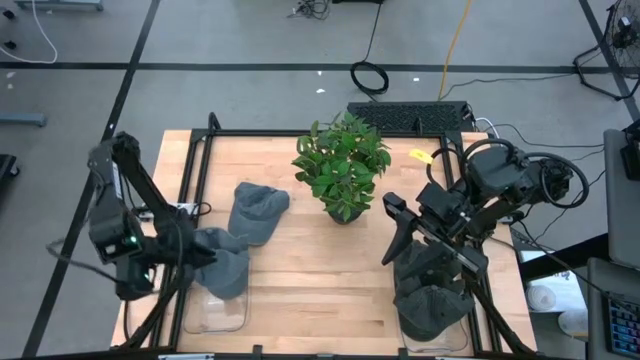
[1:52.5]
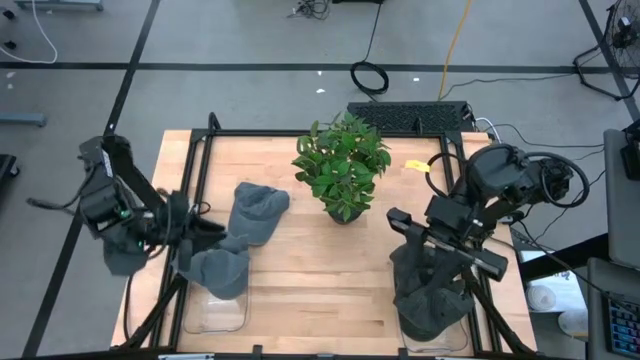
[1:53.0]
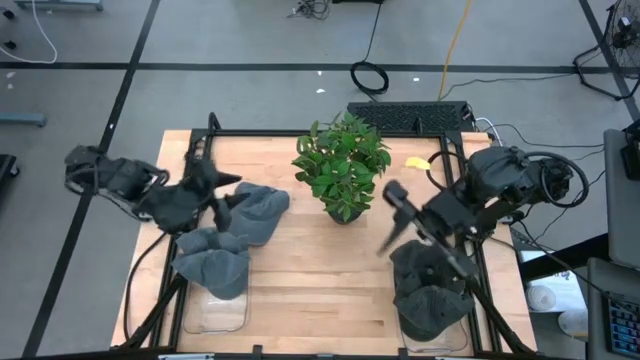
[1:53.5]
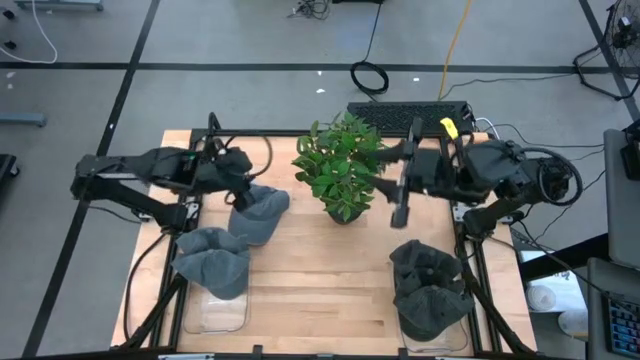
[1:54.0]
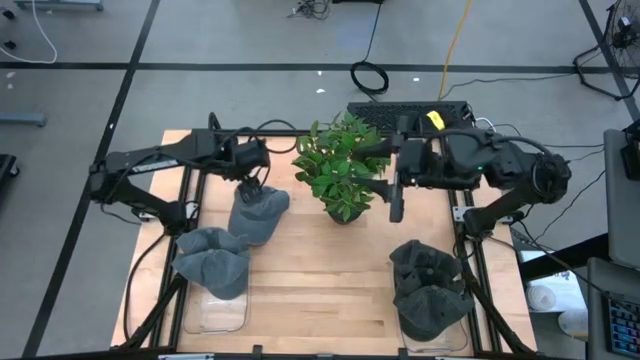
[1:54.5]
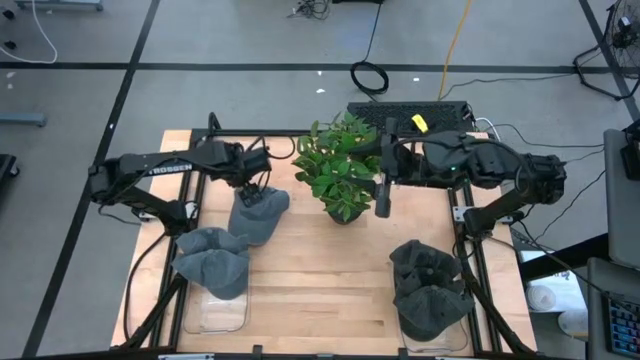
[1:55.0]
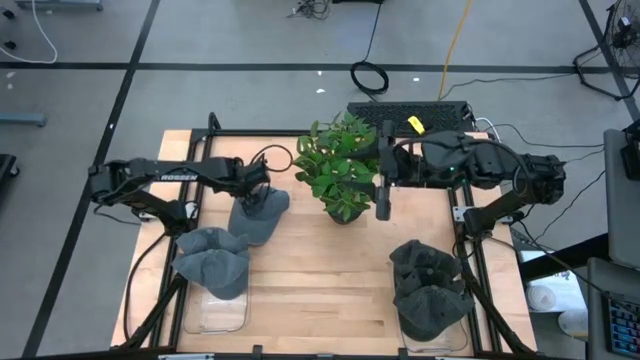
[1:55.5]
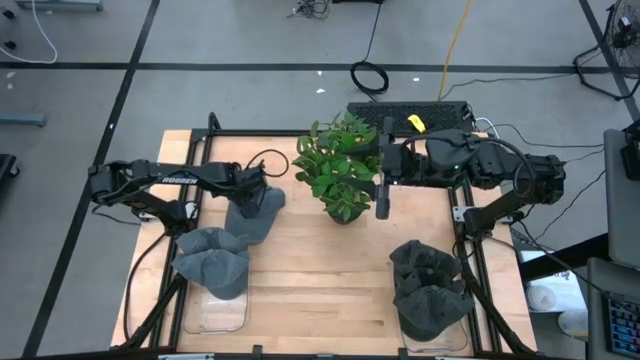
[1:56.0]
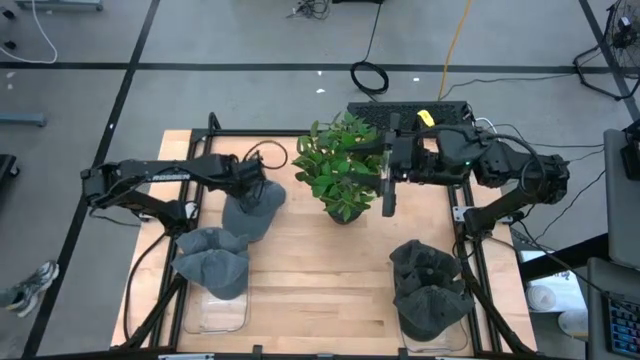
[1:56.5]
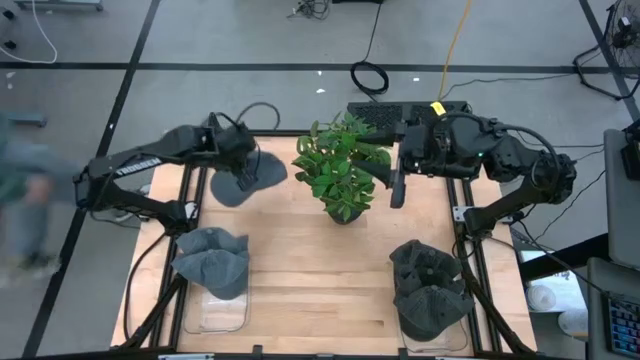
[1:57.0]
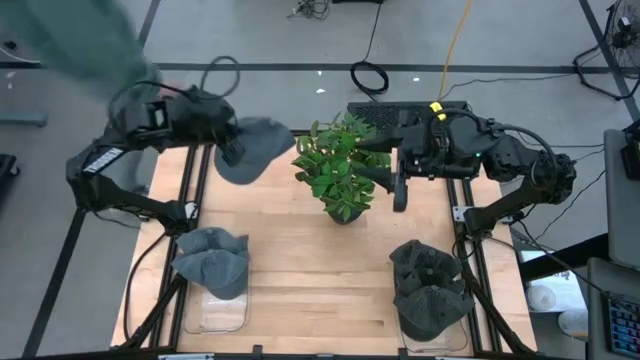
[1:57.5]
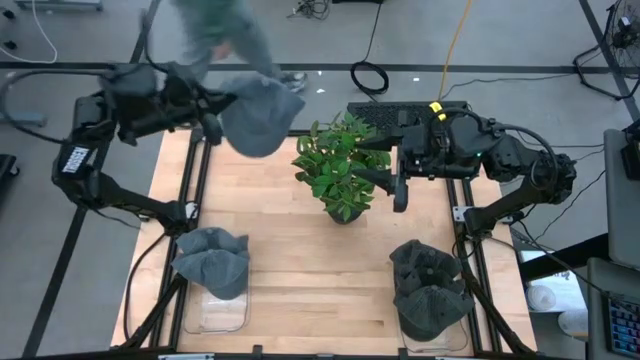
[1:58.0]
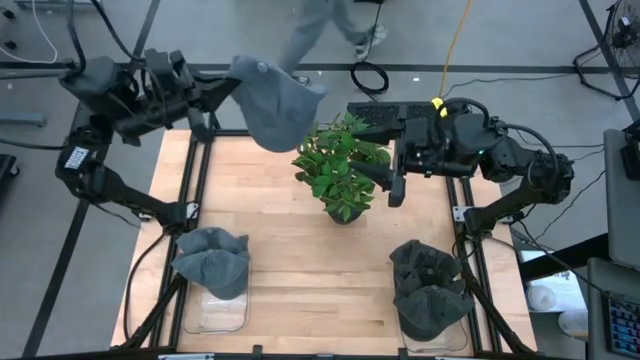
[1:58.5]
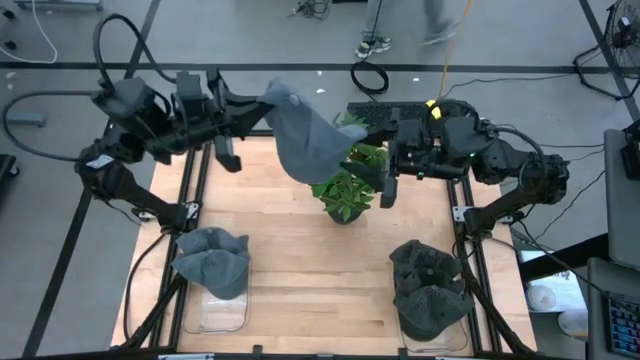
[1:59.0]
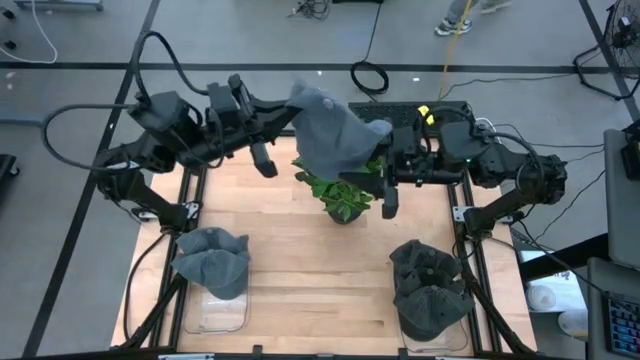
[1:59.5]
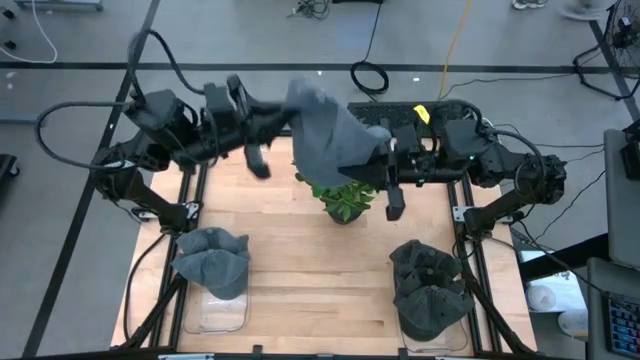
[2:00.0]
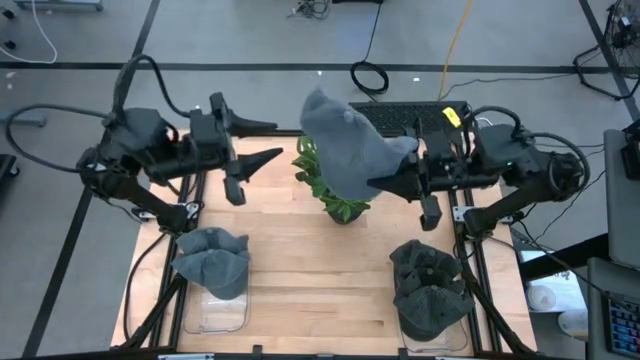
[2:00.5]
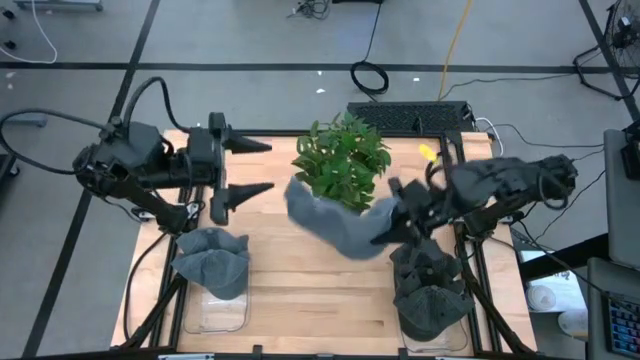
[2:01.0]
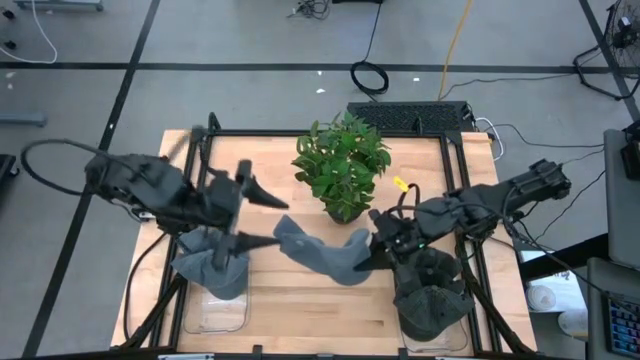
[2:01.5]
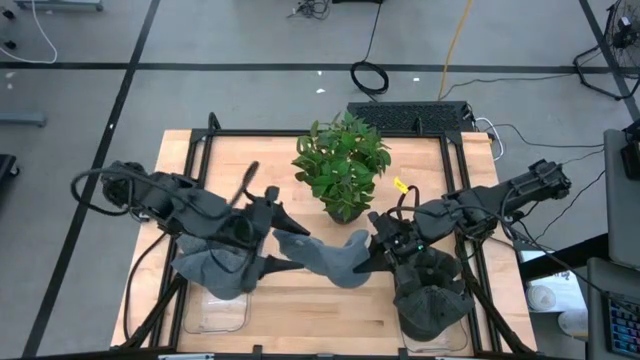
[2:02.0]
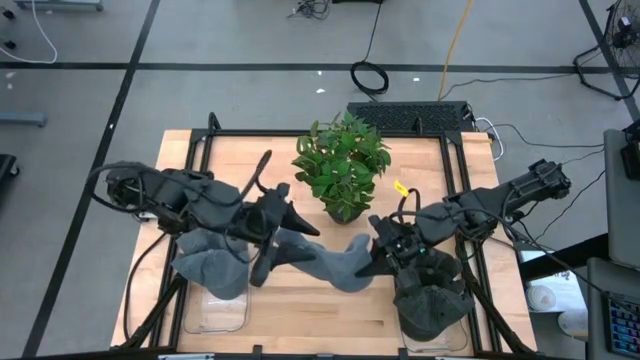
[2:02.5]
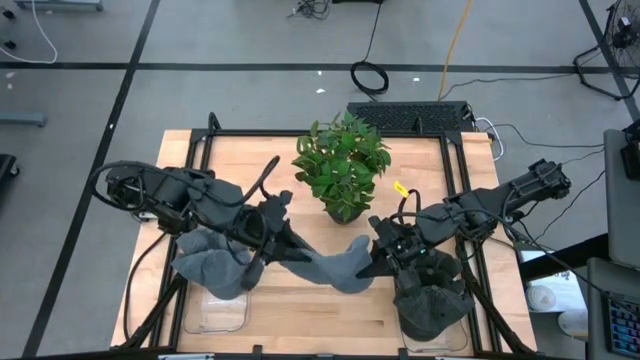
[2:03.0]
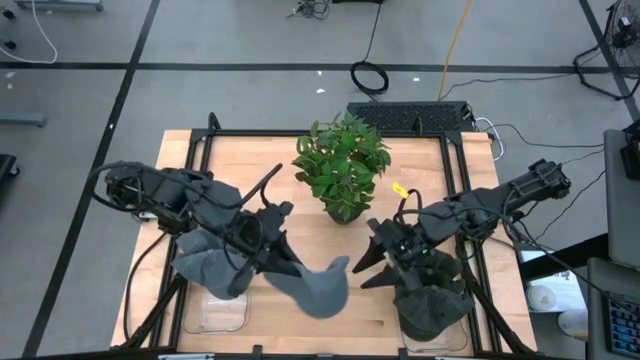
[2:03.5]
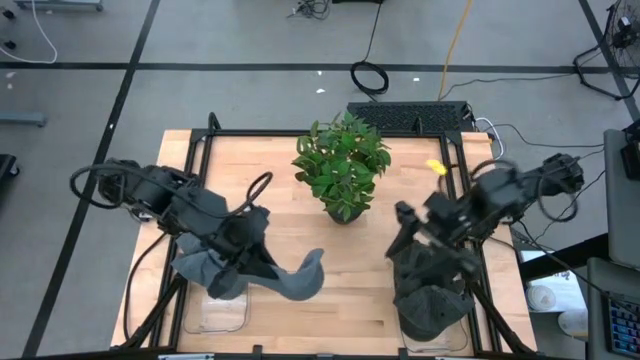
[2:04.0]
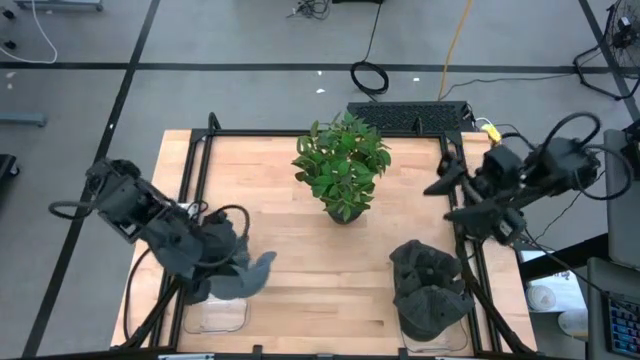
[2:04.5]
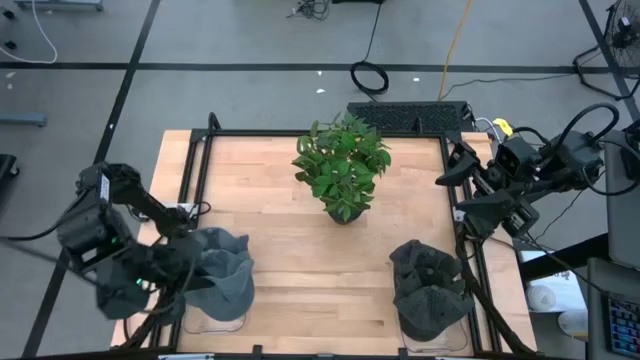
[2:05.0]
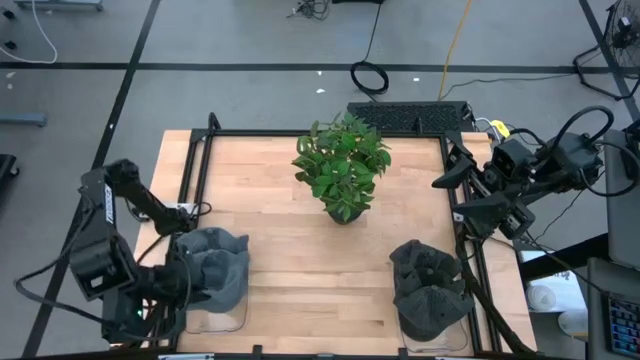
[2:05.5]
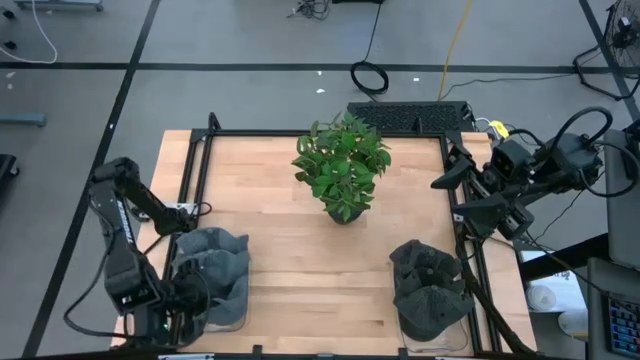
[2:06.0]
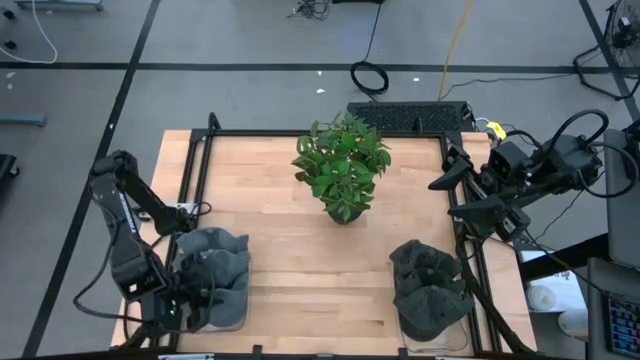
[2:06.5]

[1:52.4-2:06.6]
Task: Pick & Place hat
Put the blue cap into the left transparent bin

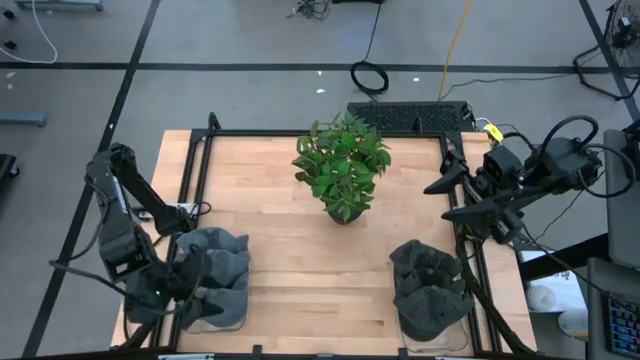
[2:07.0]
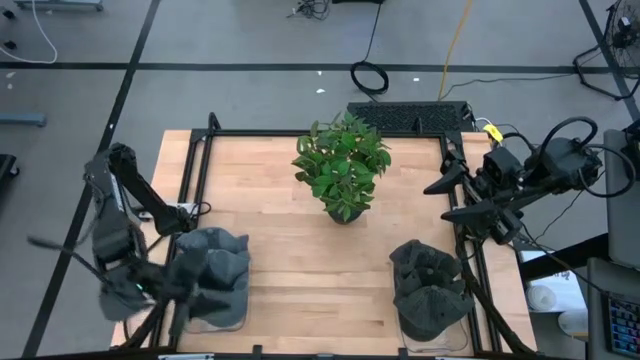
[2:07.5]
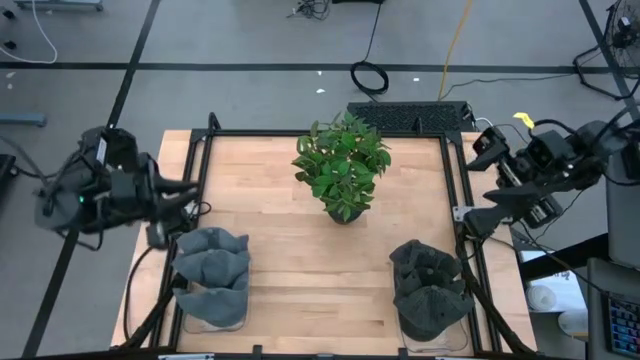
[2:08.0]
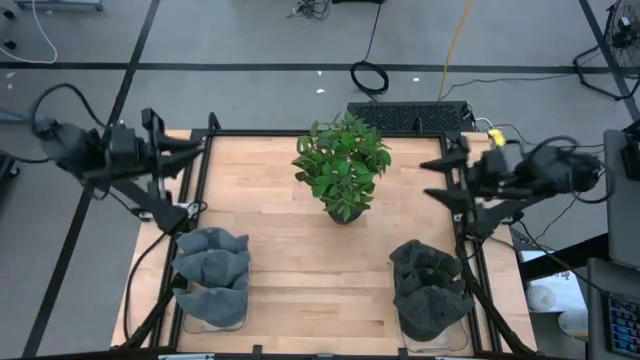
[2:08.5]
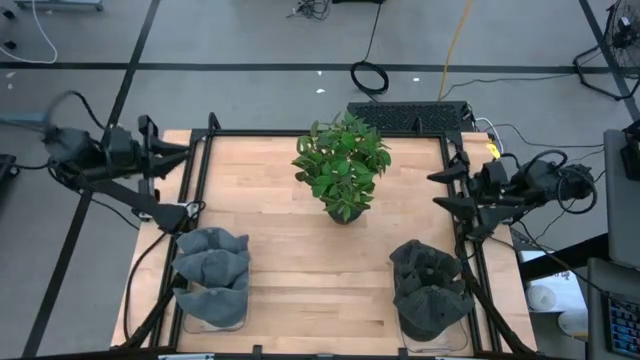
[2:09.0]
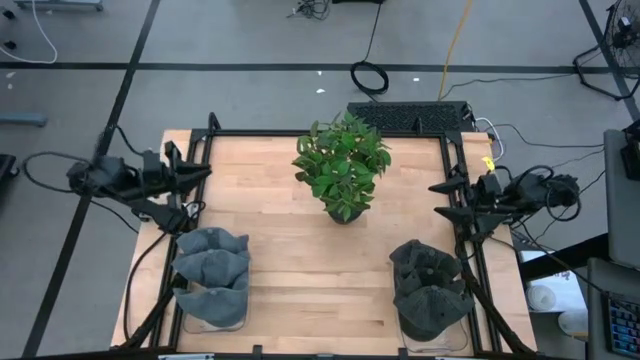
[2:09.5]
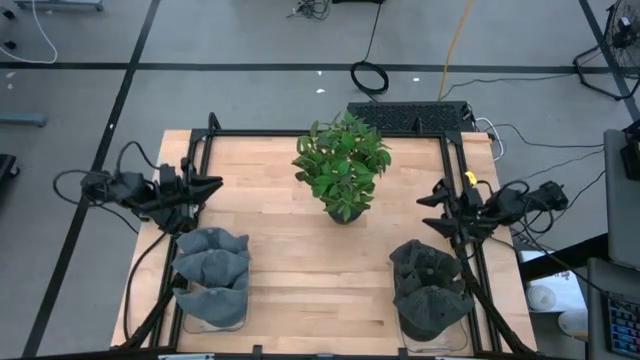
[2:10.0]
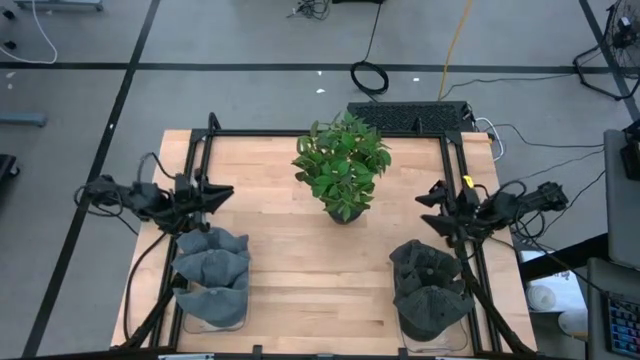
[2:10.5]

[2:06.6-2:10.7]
Return to Home Position

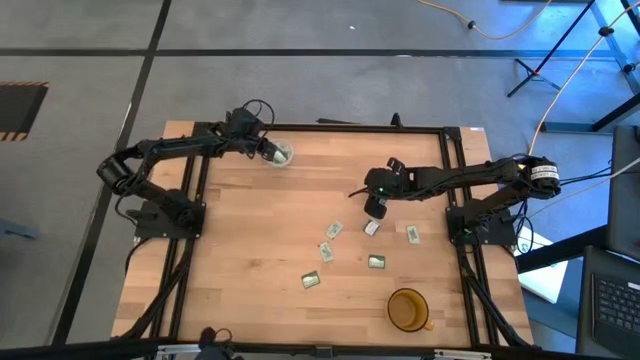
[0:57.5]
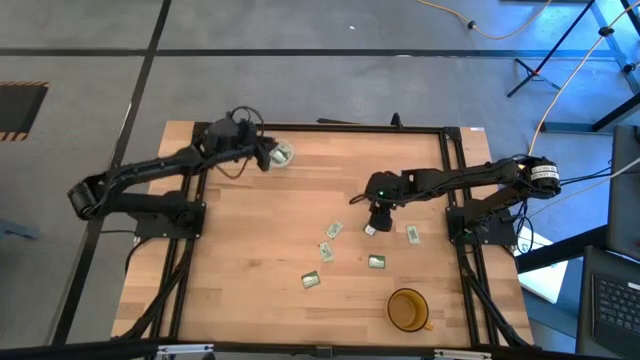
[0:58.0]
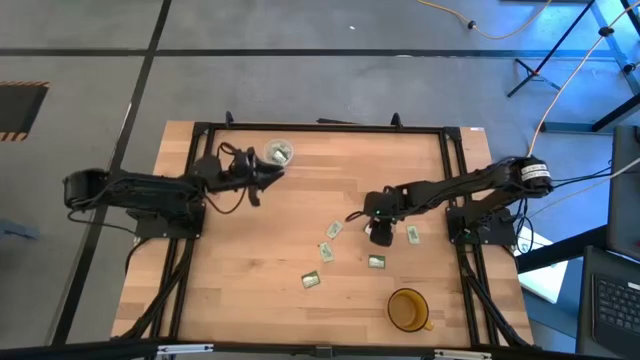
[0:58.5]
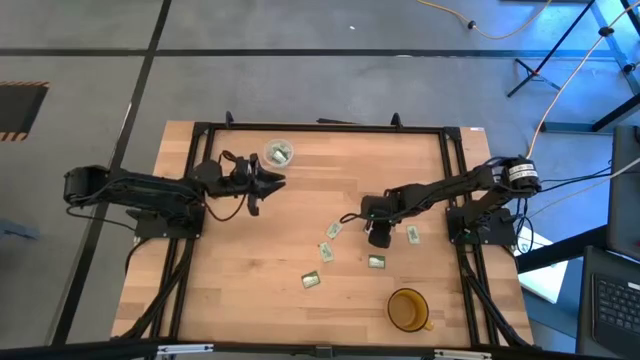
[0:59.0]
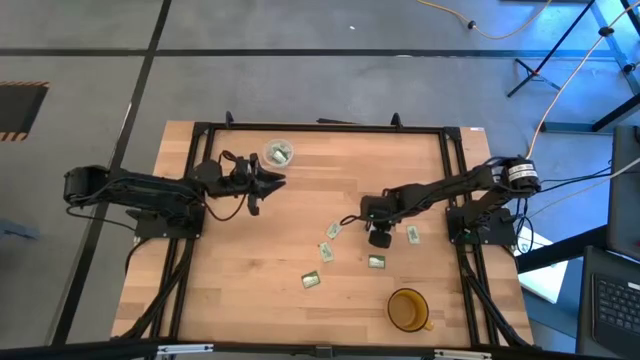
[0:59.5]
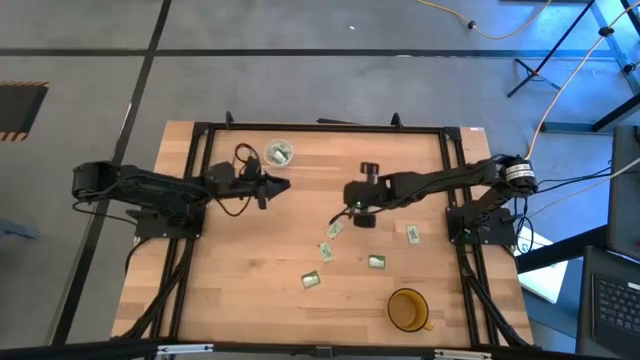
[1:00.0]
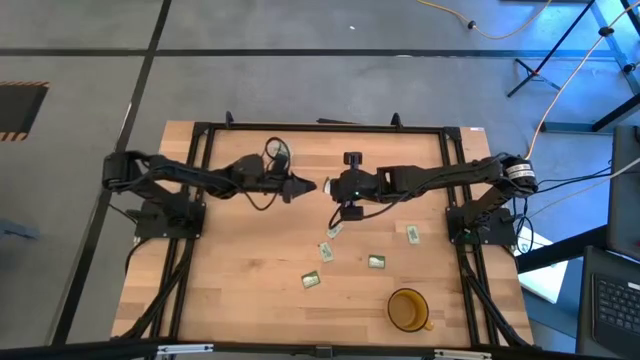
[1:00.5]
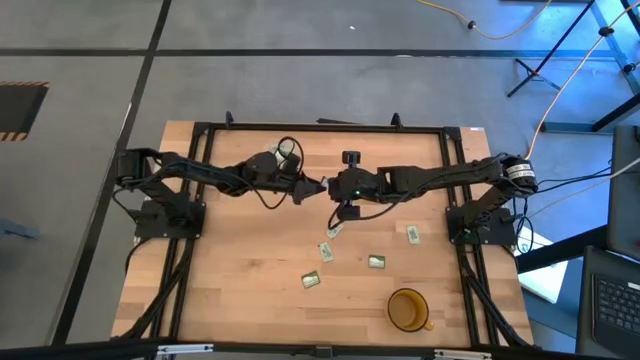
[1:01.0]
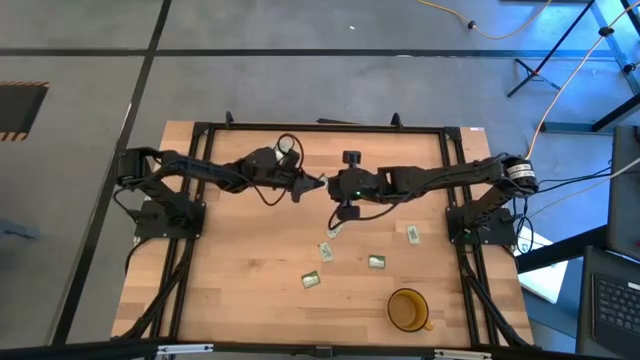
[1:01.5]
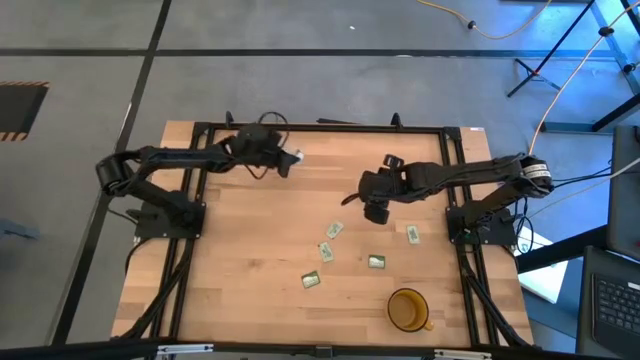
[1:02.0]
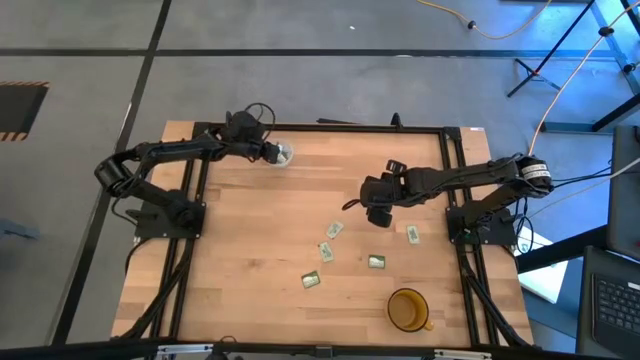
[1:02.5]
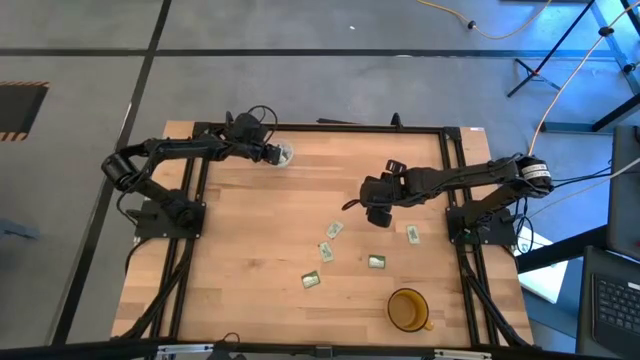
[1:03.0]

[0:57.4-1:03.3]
Task: Pick and place Stevia / Truvia into bins
Put the truvia packet into the transparent container
